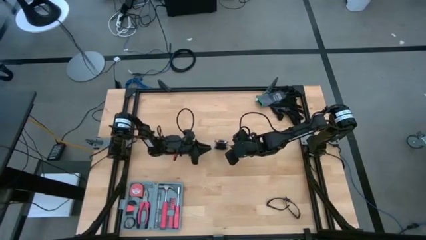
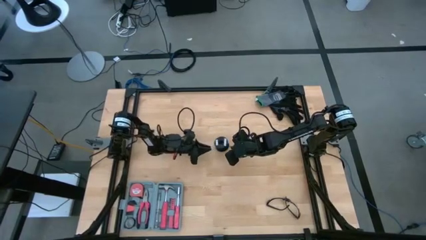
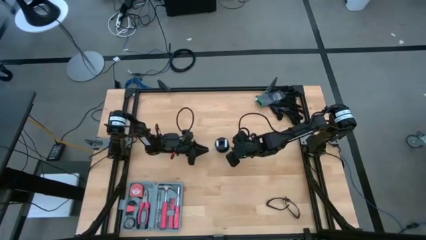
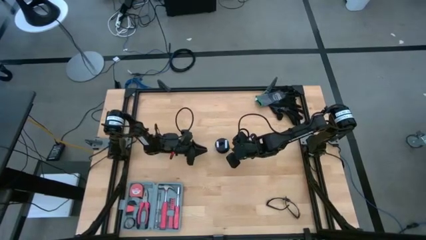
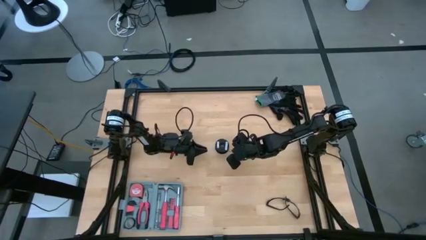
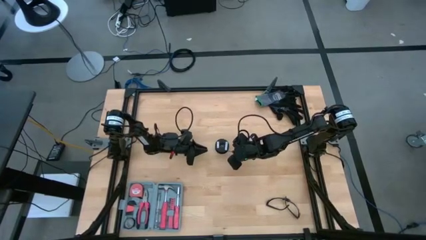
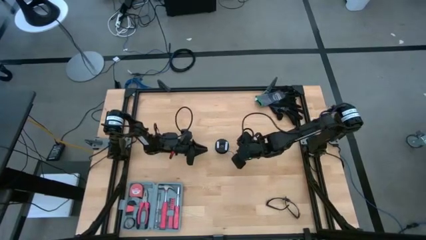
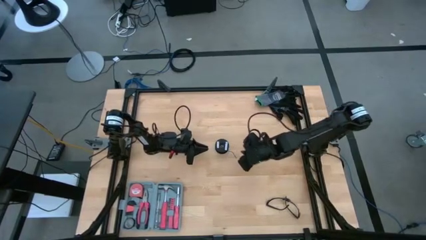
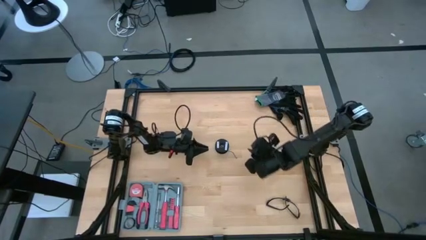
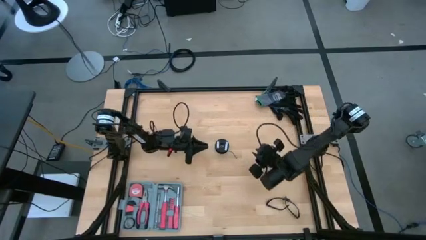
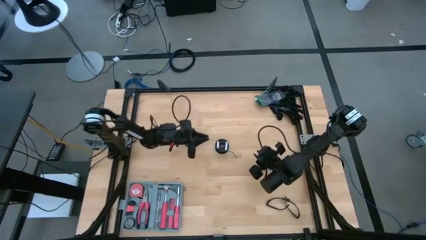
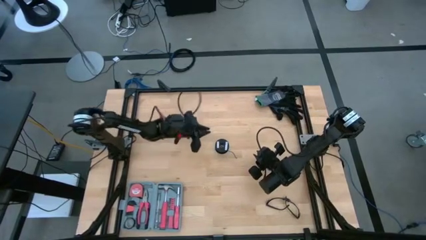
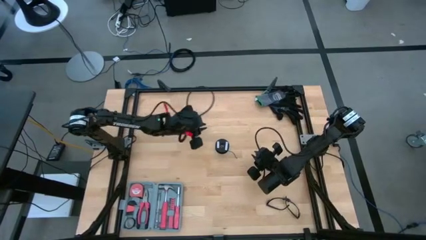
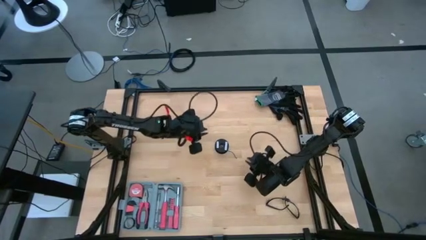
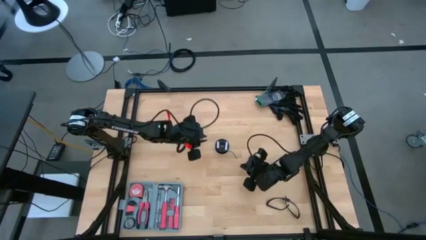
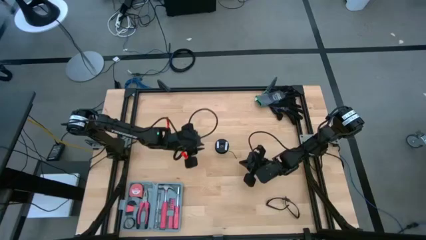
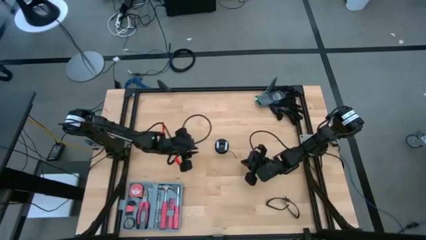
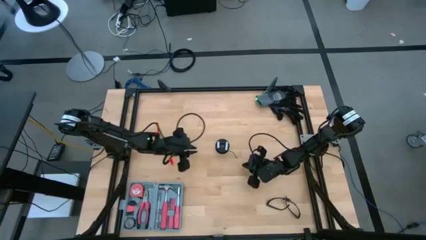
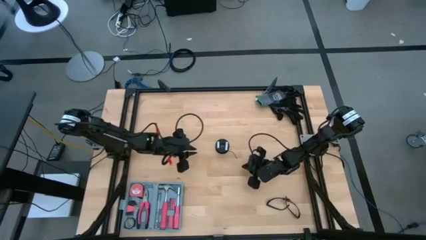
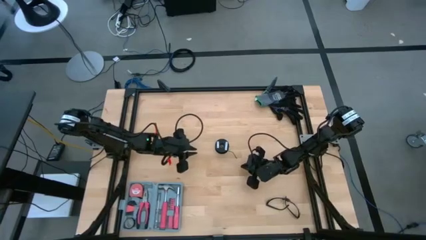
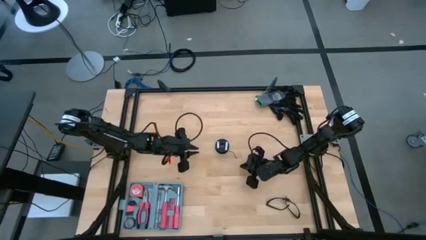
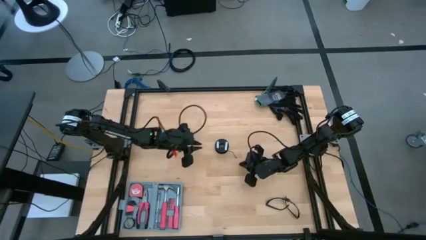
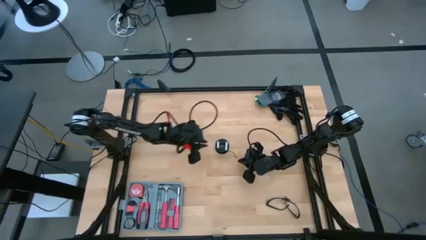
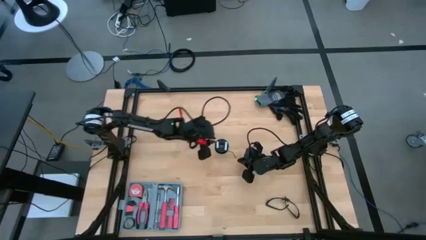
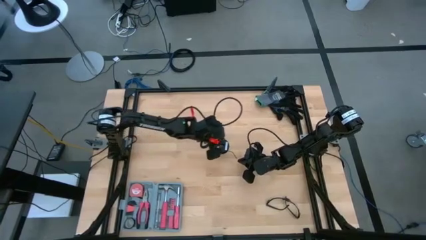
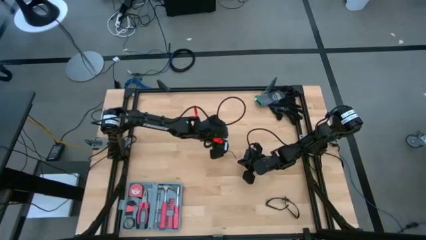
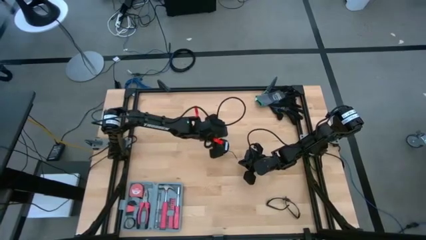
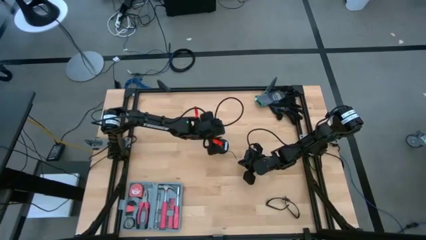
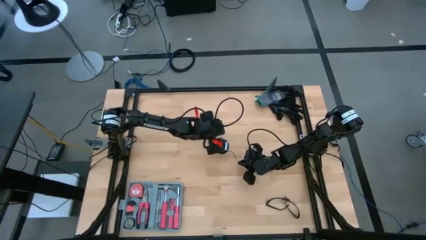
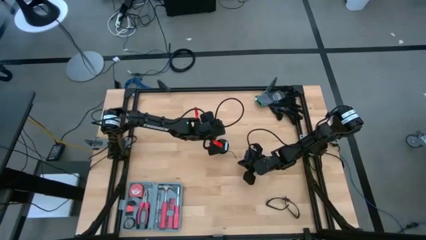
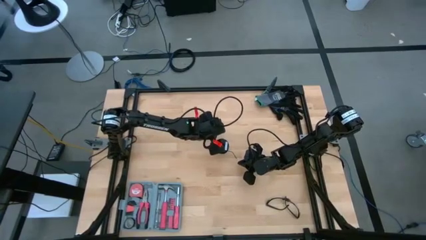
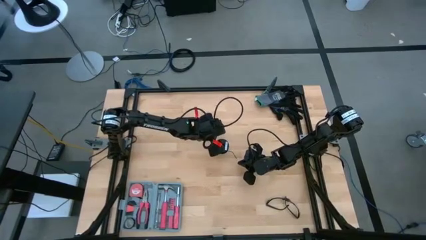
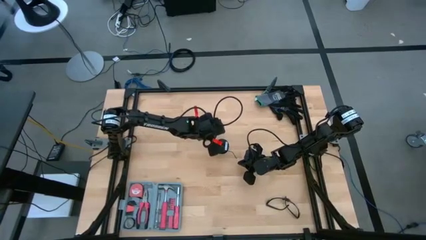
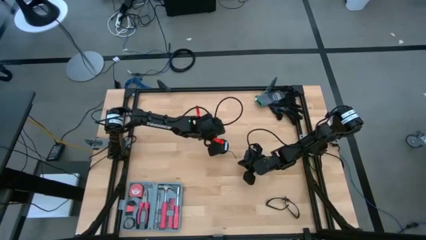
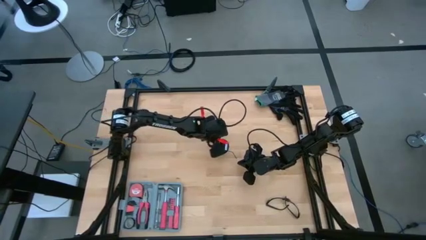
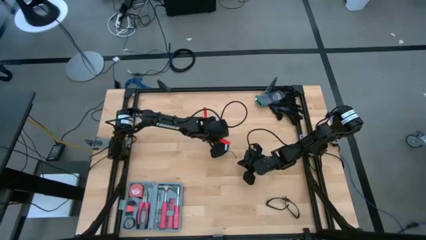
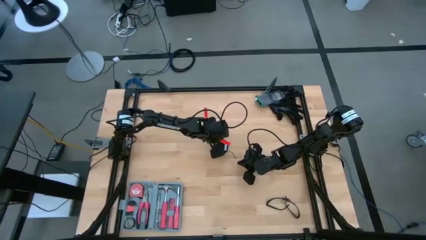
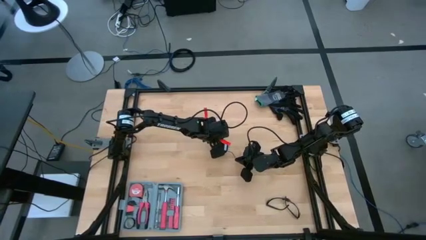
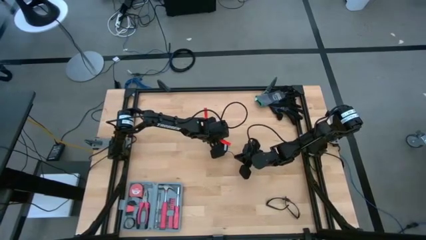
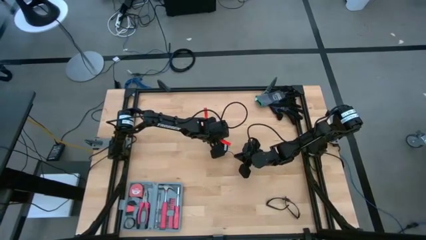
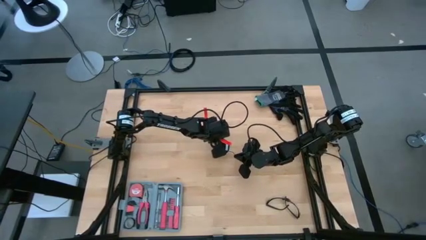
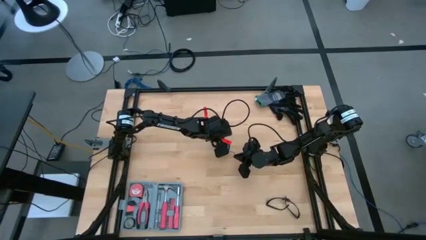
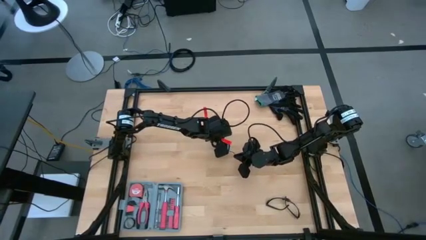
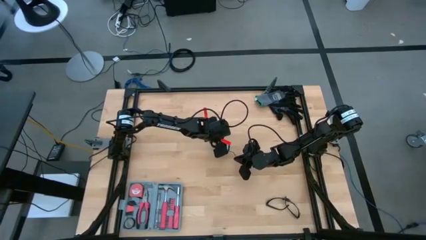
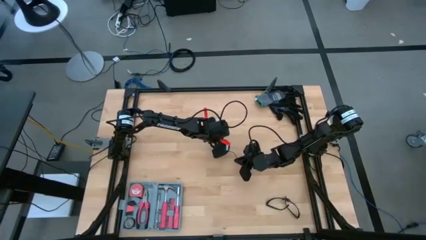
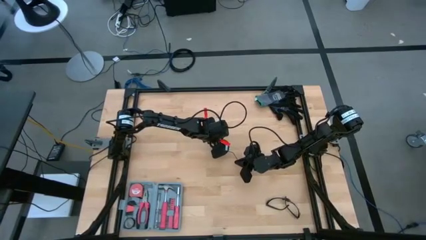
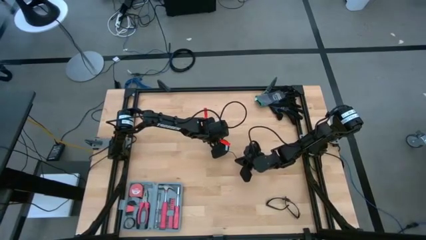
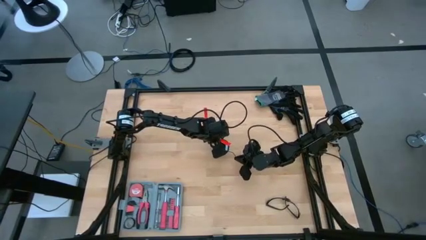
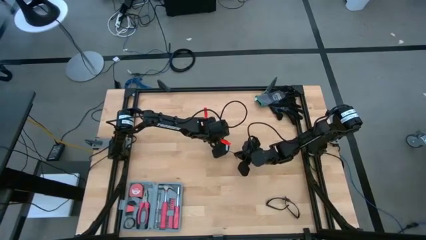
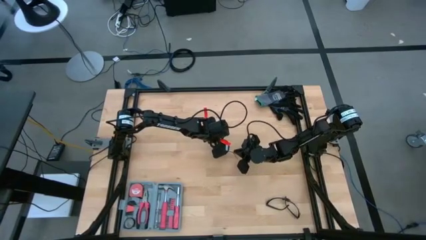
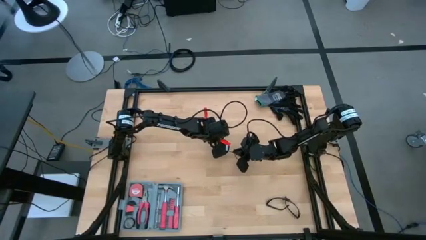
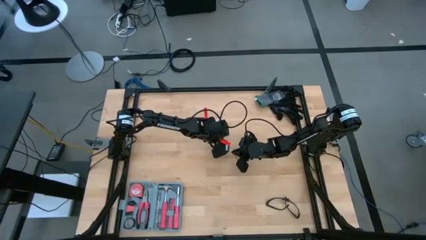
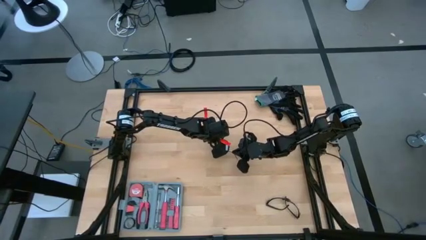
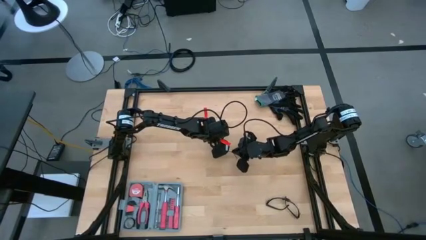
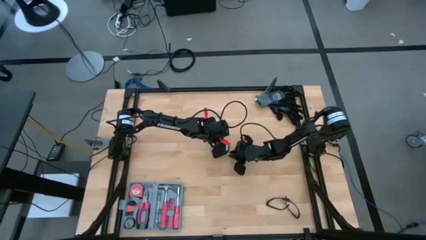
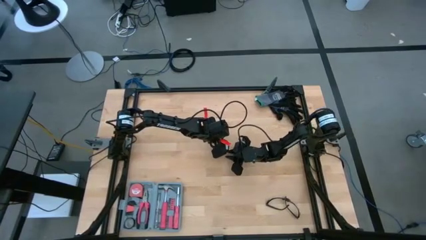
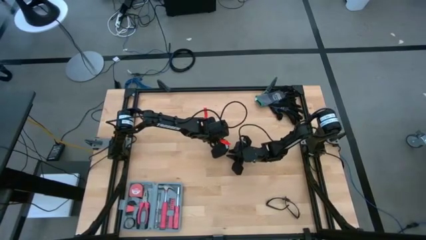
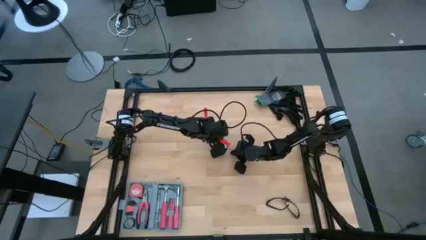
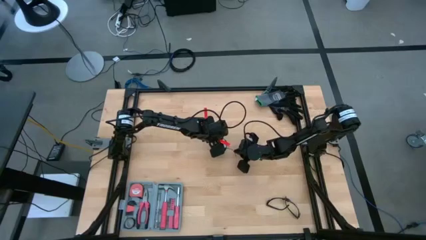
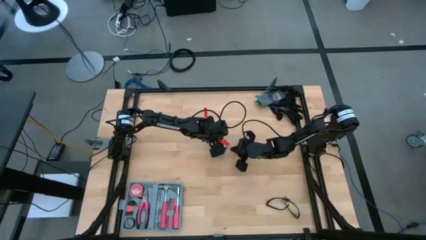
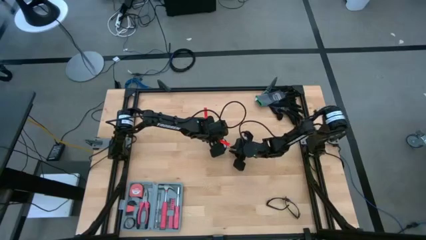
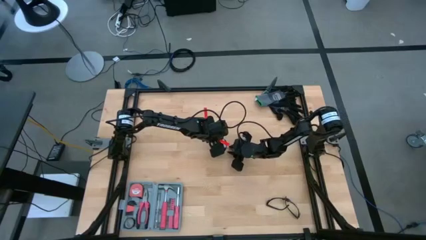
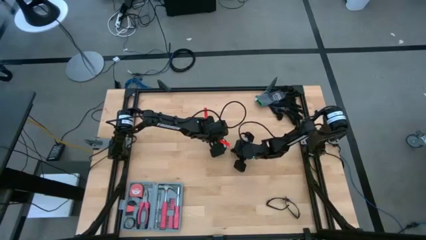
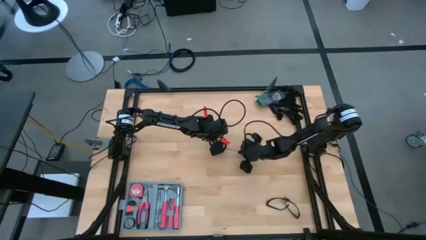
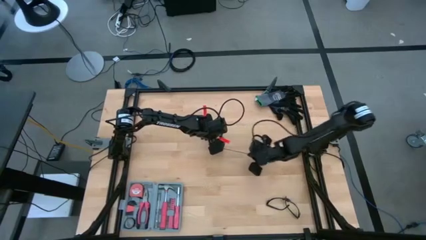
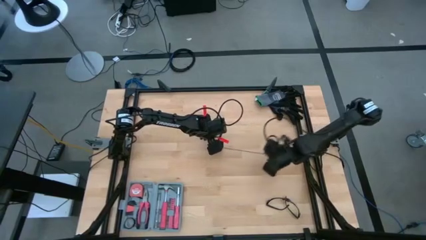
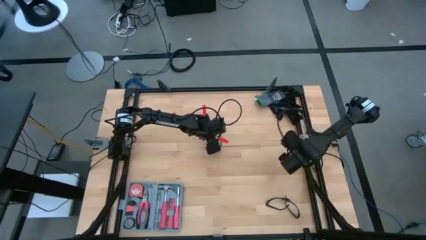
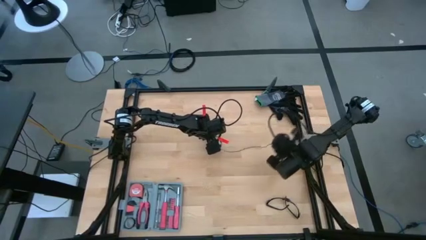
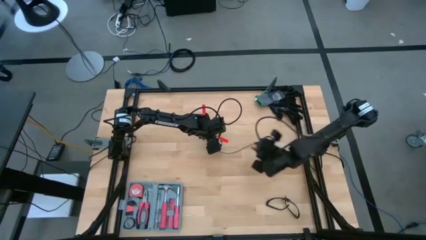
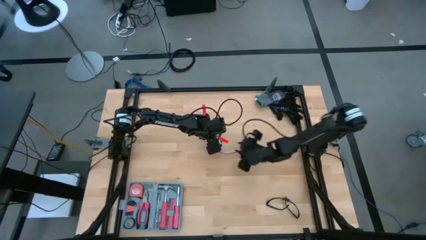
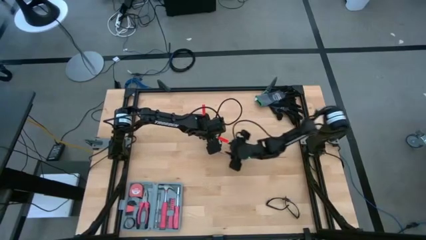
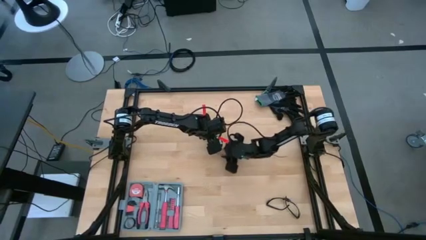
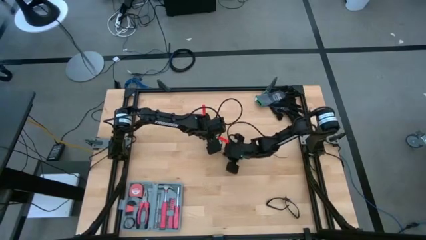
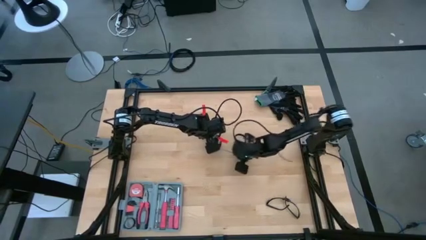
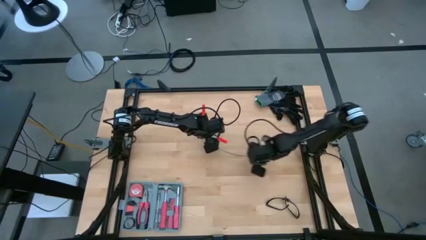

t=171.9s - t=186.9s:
Task: Coil cords
Uncoil the black wire from the spool
